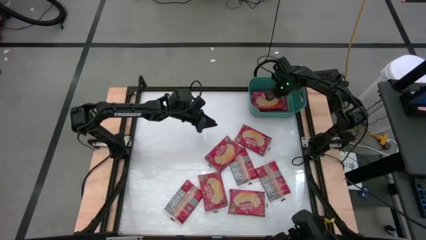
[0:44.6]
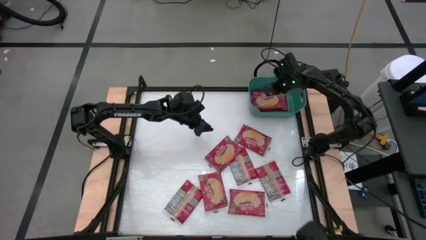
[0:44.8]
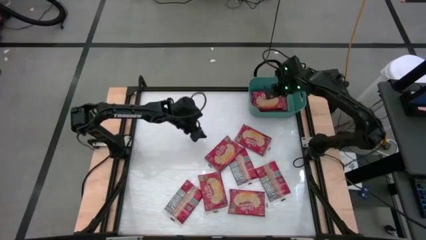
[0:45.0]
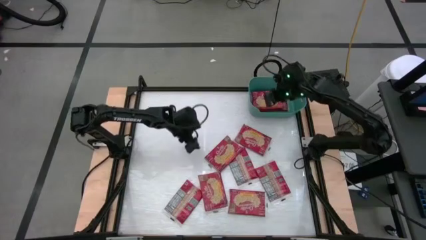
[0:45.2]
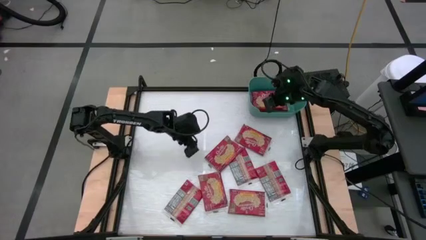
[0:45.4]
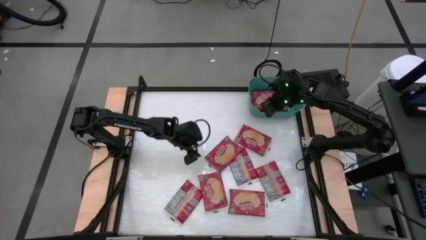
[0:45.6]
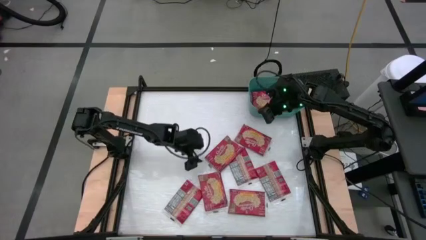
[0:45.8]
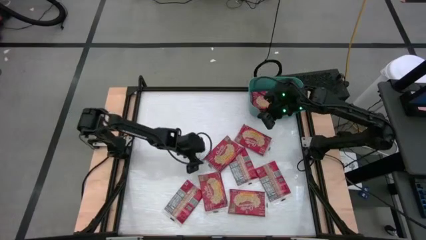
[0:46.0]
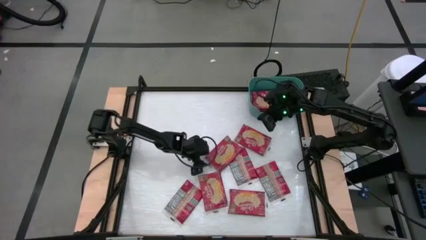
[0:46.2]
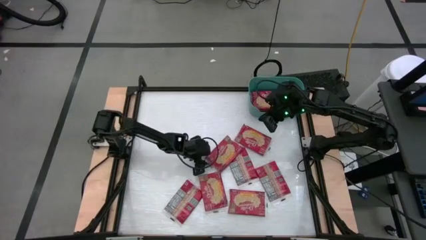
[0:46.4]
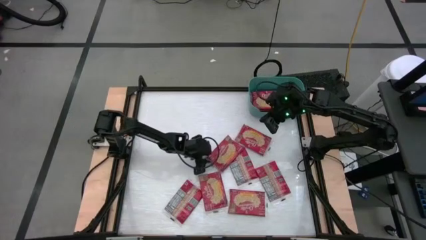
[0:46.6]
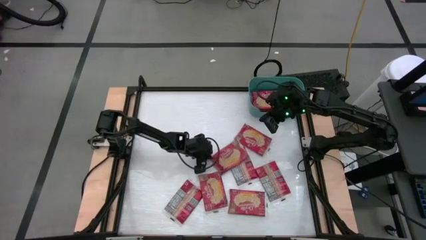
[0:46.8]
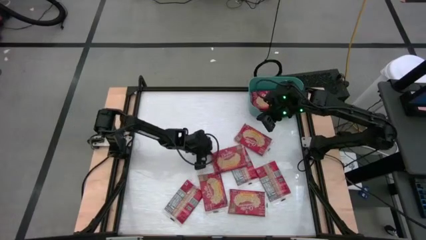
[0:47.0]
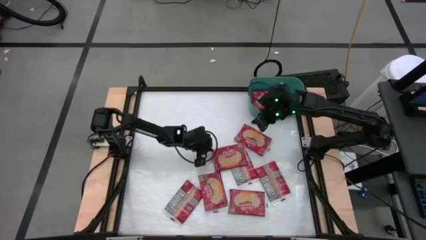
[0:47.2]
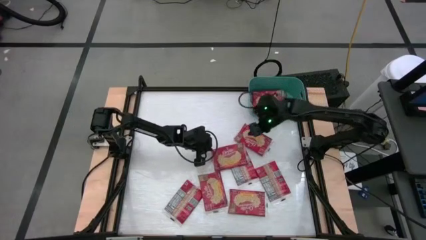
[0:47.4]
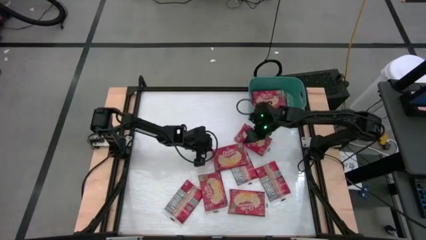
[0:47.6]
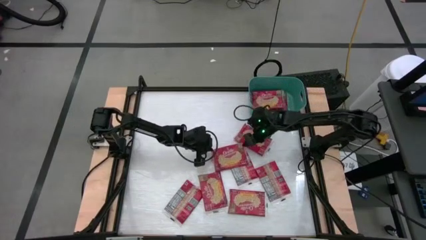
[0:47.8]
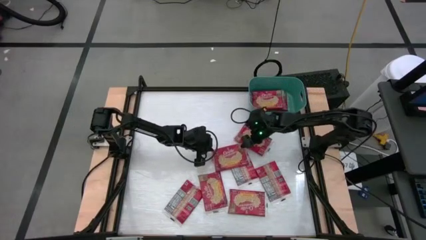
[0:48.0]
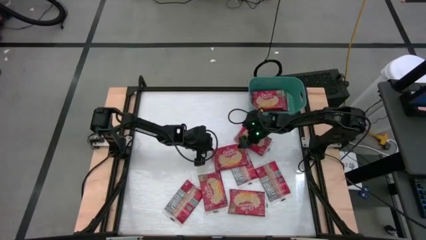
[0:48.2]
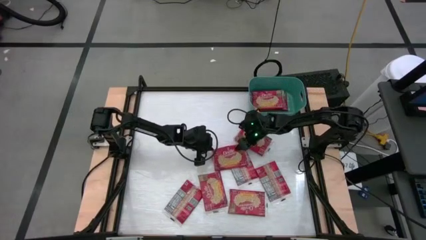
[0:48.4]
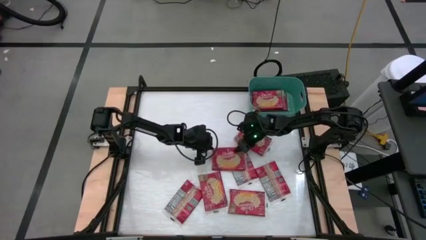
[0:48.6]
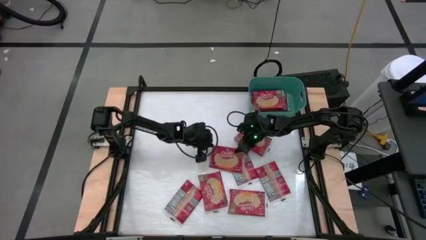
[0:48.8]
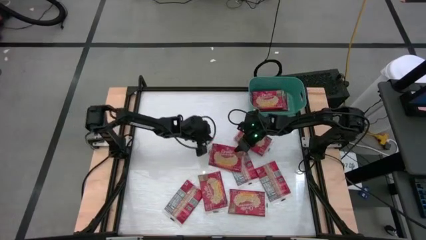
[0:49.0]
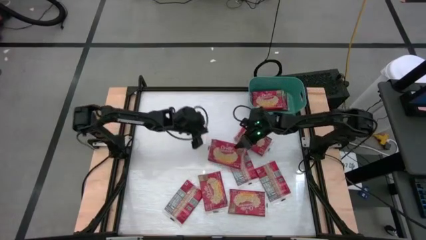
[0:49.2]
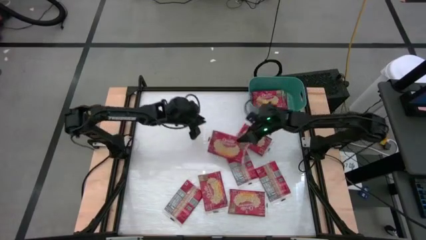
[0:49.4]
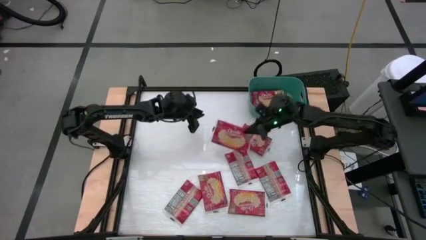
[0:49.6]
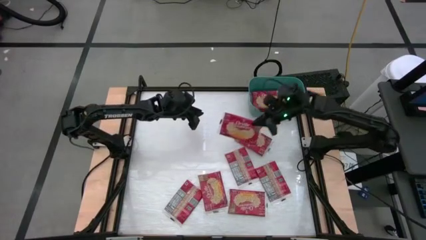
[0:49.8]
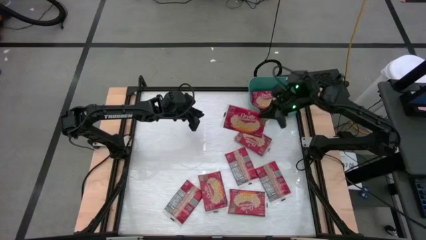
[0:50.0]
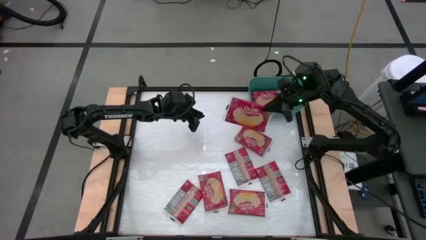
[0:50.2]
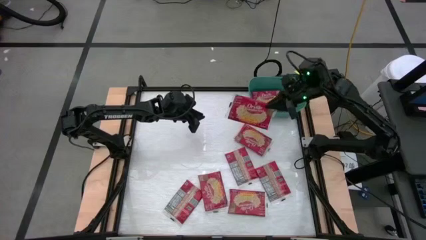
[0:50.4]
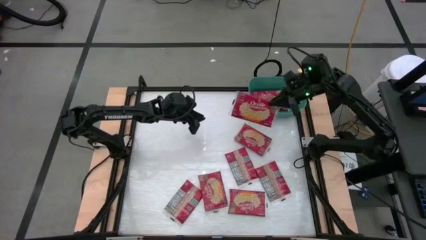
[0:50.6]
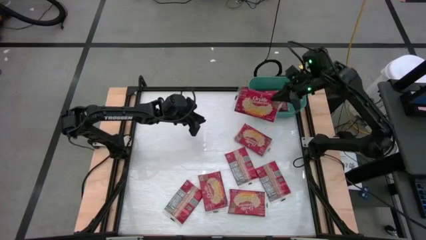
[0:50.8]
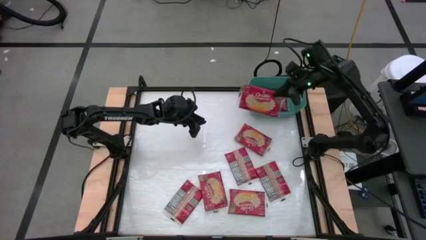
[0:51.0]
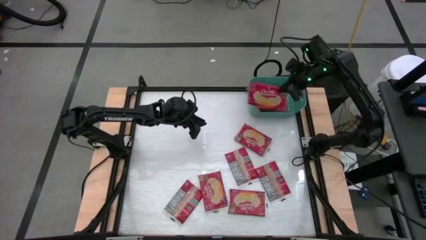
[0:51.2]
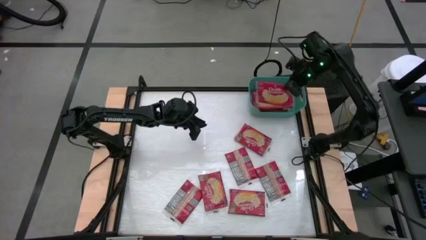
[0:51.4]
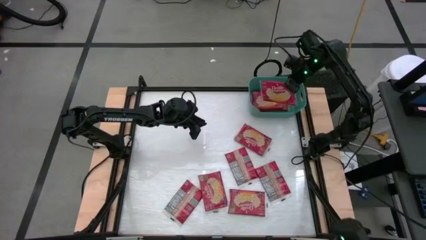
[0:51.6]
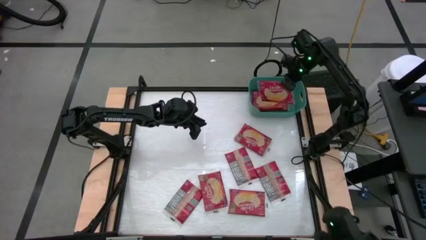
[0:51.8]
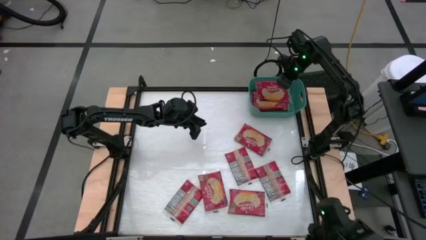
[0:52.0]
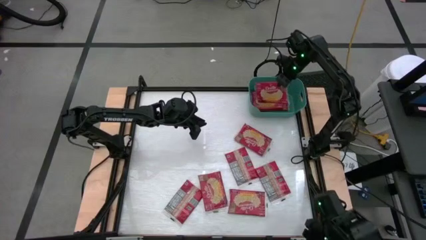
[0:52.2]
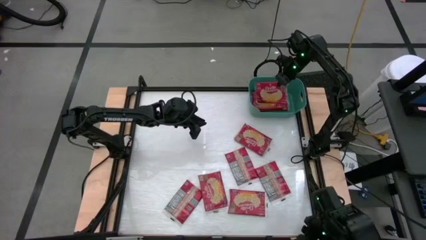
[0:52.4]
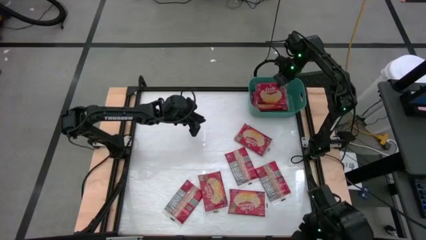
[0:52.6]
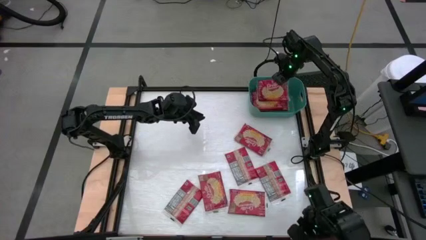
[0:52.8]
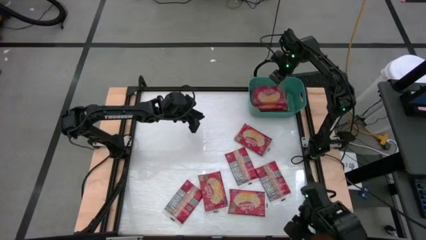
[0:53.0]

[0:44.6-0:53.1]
Task: Sort popcorn bags into baskets
Put the red popcorn bag into the green bin

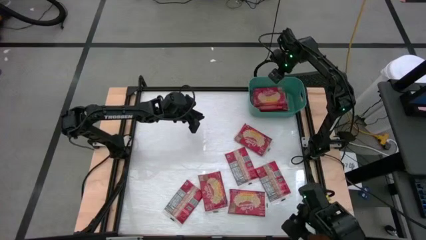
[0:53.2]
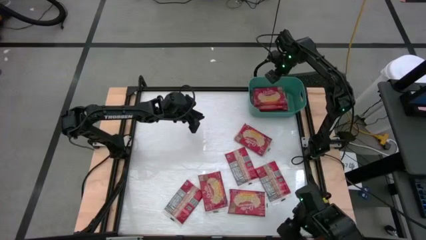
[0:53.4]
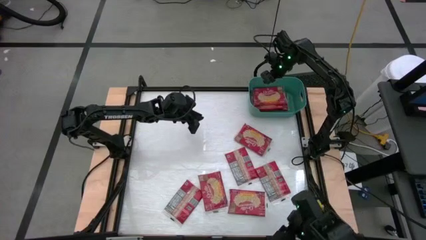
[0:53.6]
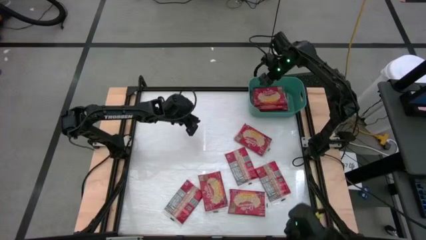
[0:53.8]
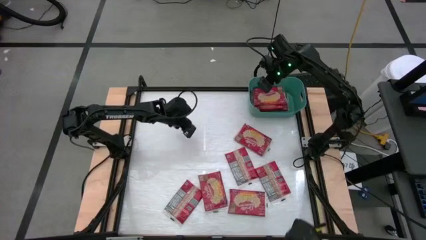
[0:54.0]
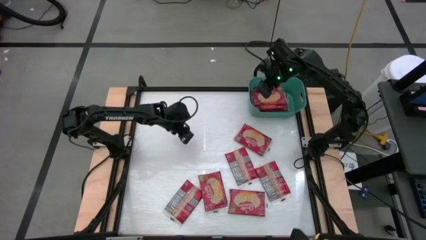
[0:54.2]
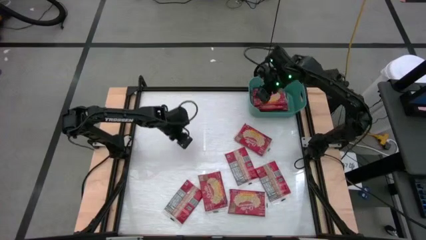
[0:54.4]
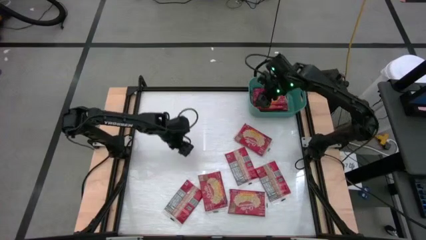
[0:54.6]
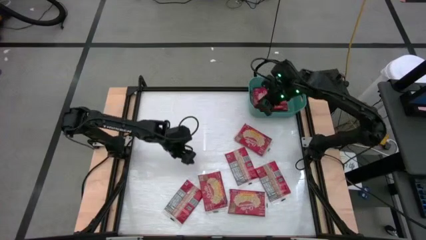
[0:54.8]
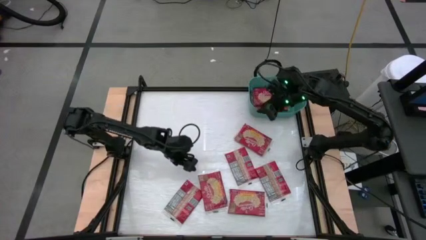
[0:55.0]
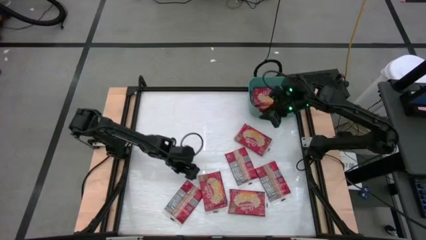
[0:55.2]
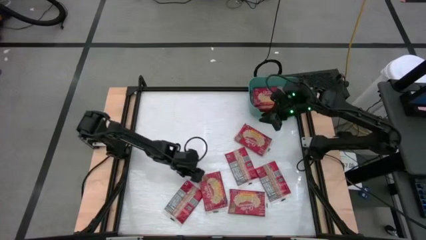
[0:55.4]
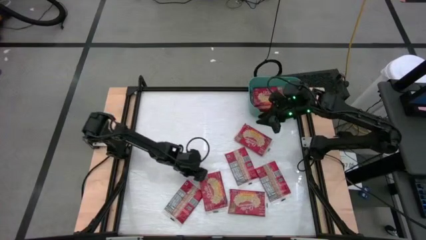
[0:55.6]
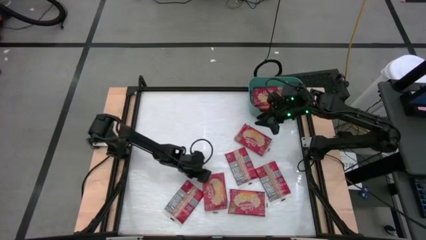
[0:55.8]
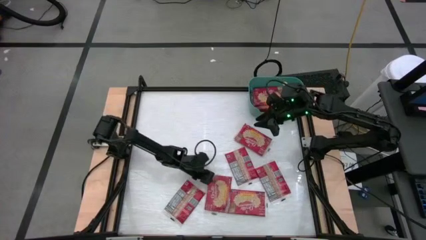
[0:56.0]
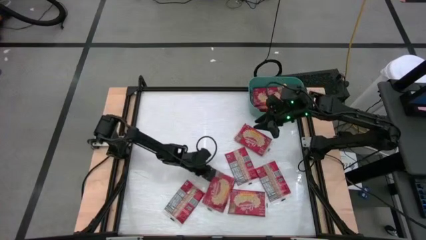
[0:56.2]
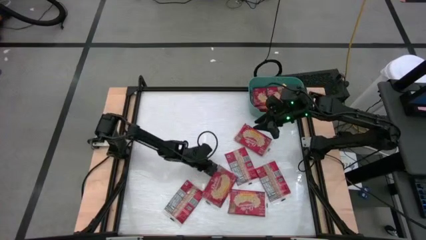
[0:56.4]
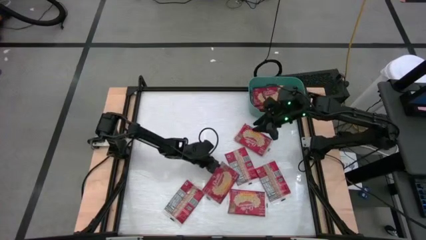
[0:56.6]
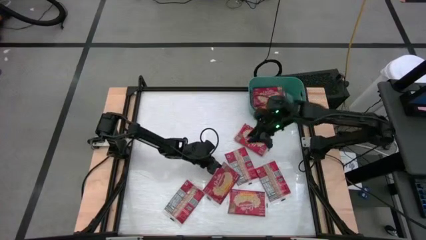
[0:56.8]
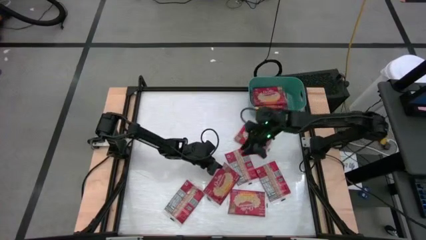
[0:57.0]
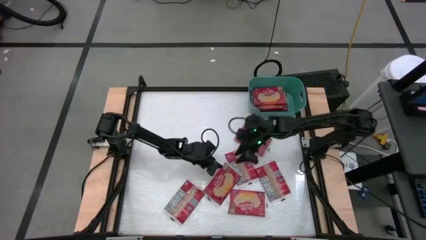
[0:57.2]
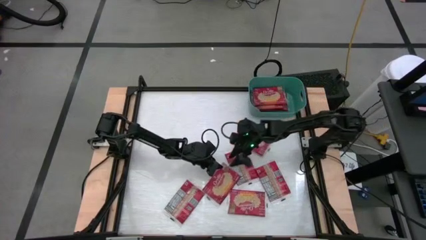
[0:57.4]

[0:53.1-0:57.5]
Put the red popcorn bag into the green bin
